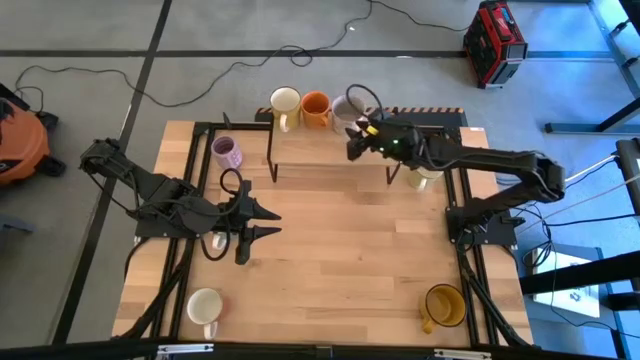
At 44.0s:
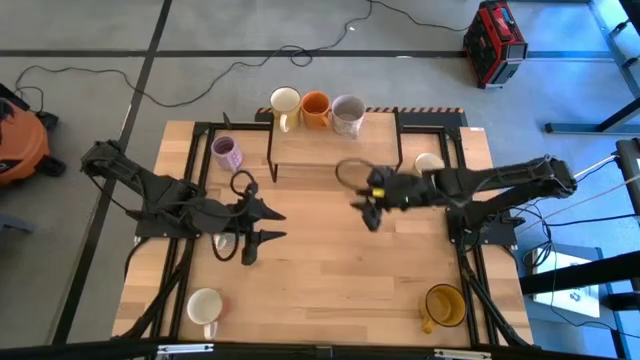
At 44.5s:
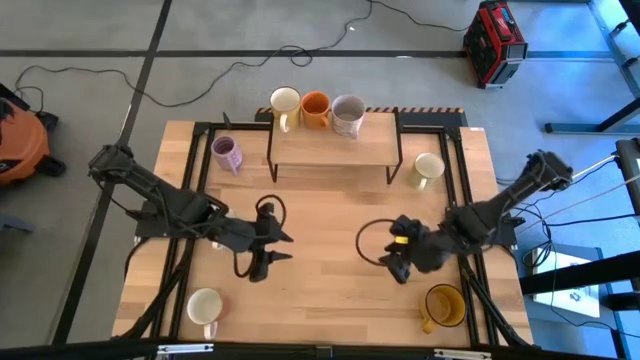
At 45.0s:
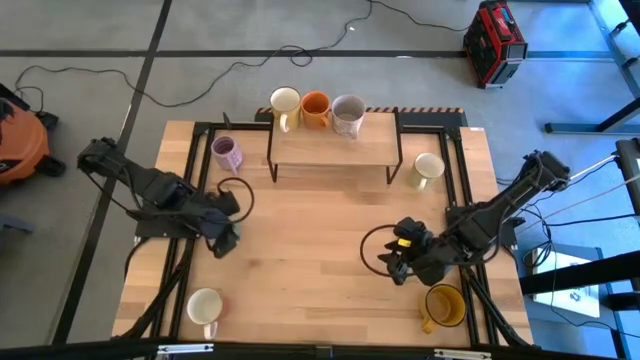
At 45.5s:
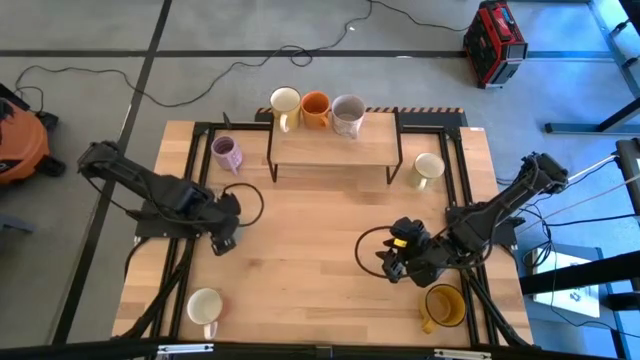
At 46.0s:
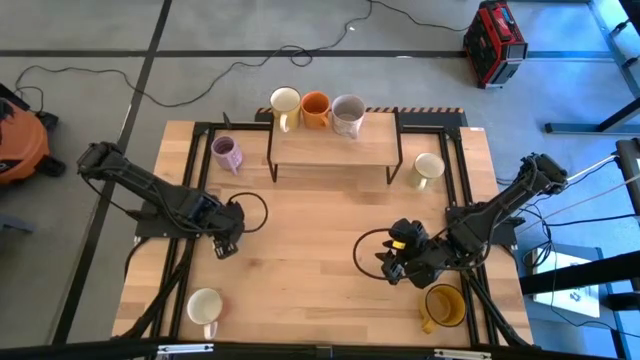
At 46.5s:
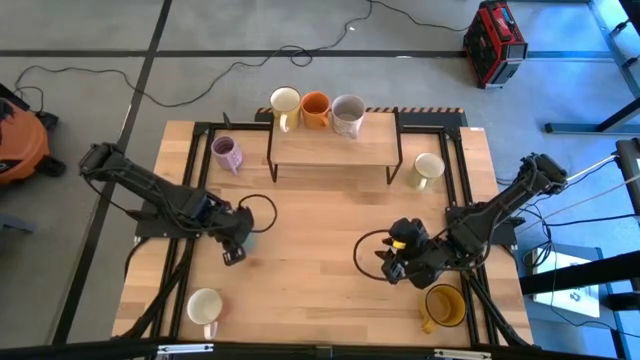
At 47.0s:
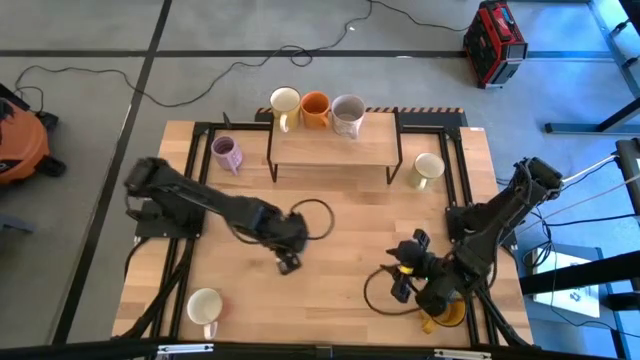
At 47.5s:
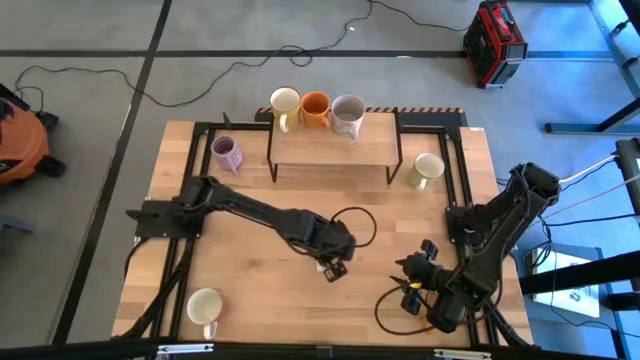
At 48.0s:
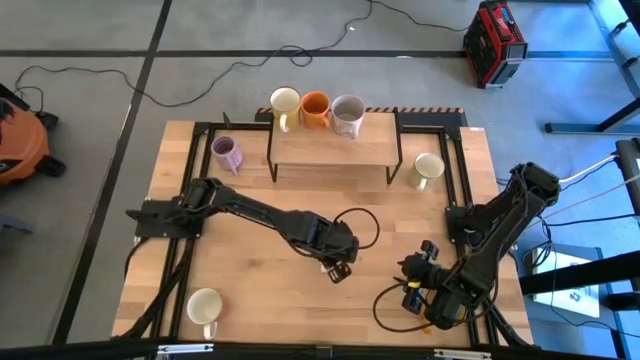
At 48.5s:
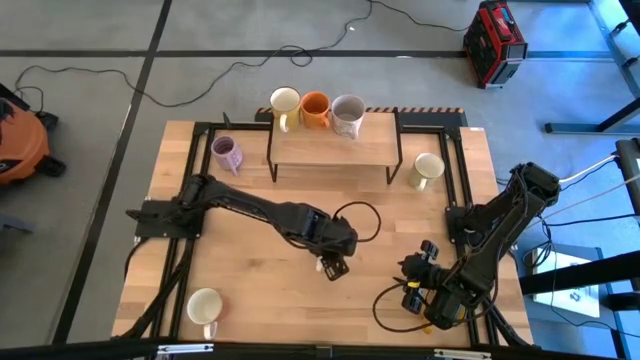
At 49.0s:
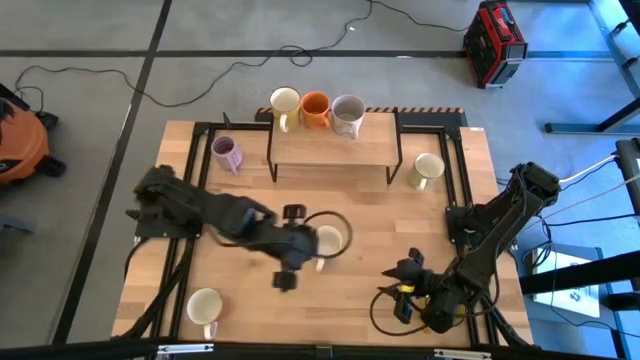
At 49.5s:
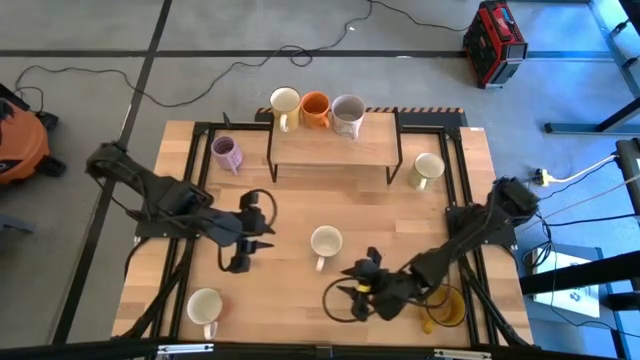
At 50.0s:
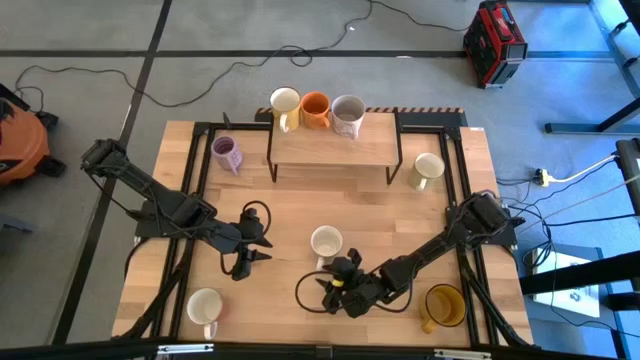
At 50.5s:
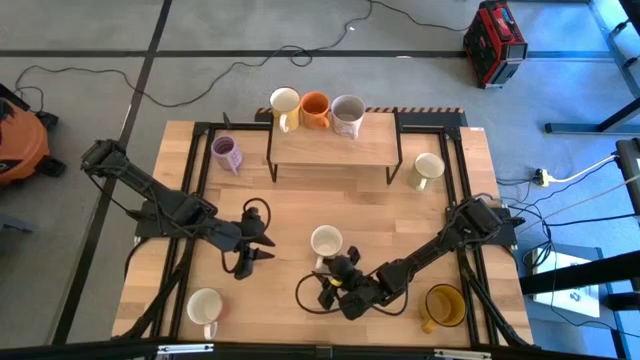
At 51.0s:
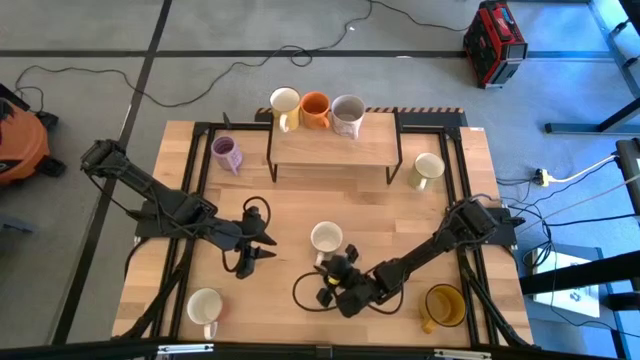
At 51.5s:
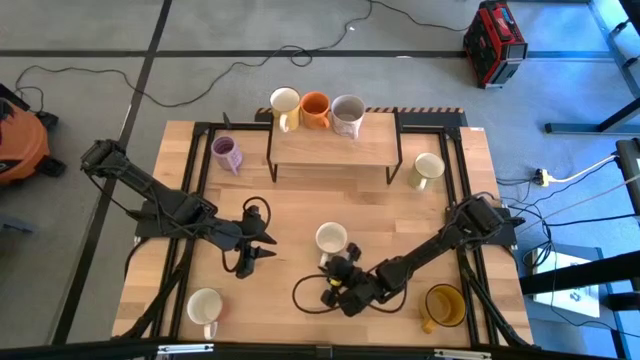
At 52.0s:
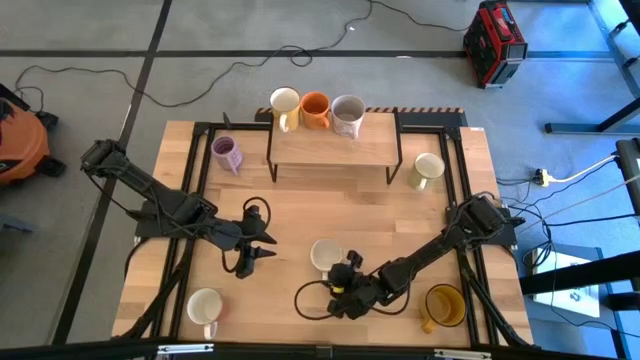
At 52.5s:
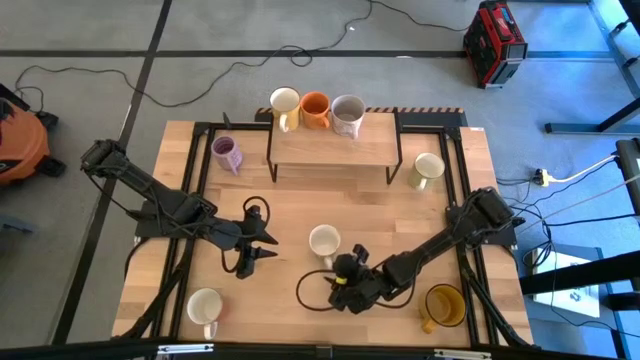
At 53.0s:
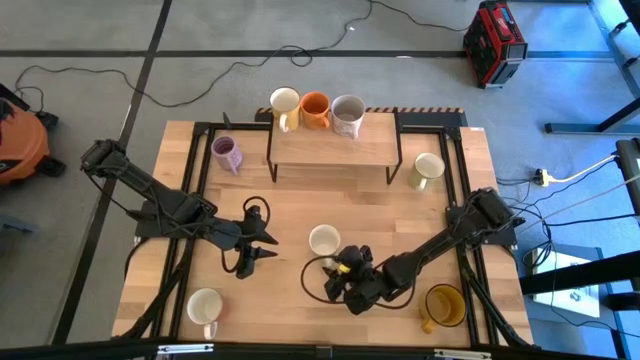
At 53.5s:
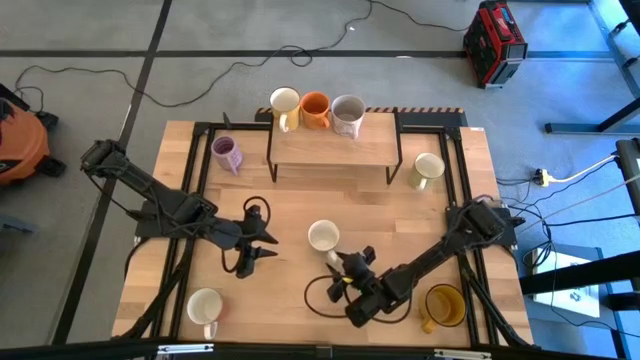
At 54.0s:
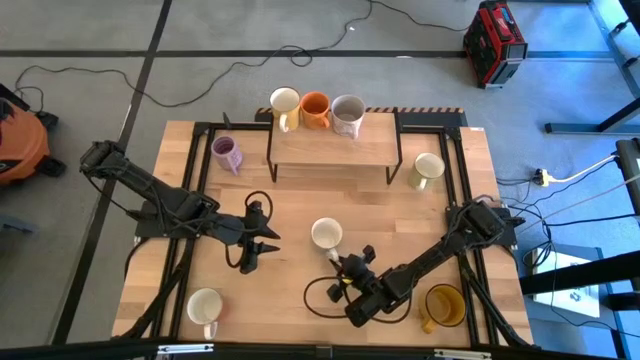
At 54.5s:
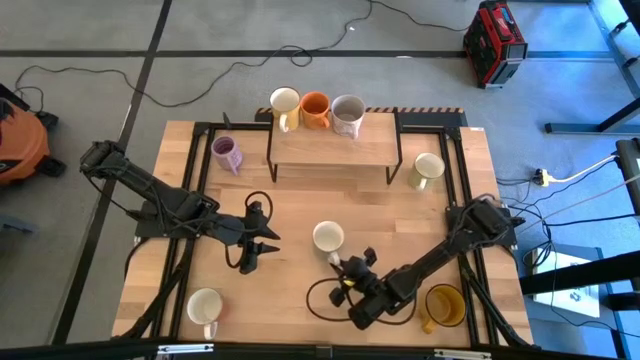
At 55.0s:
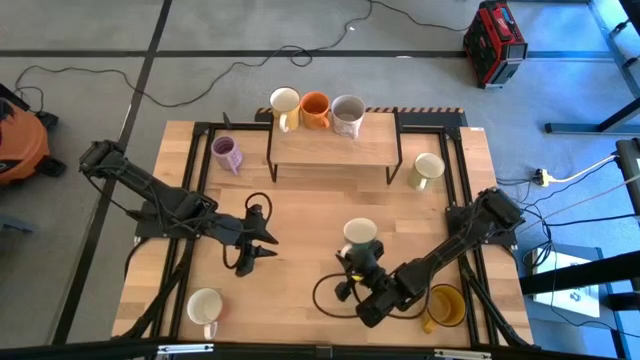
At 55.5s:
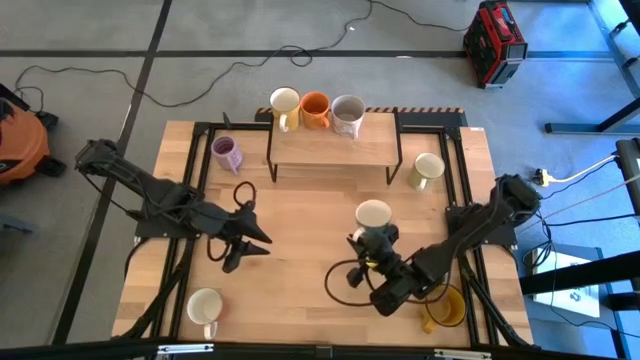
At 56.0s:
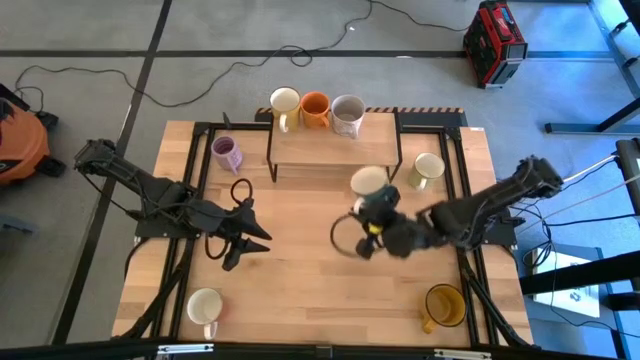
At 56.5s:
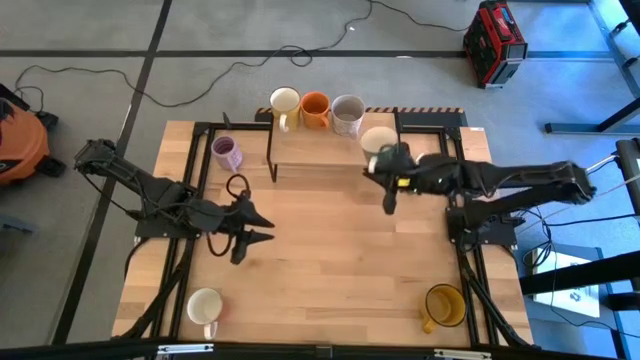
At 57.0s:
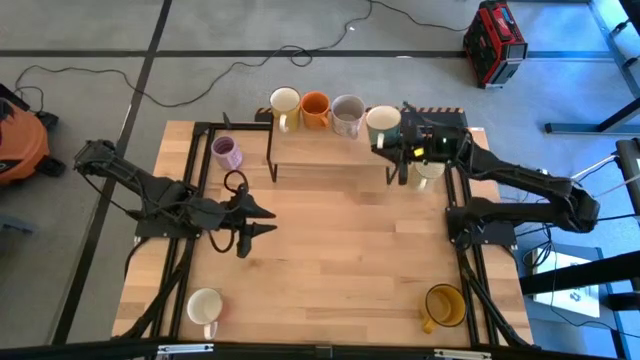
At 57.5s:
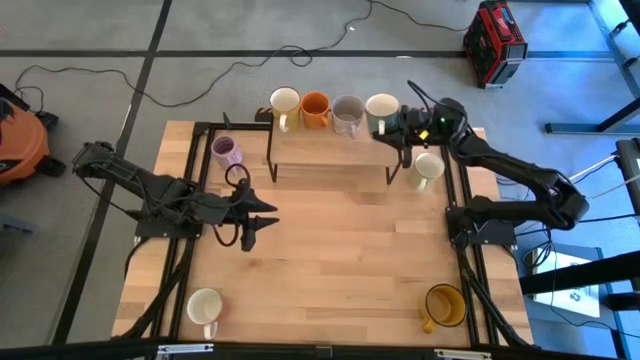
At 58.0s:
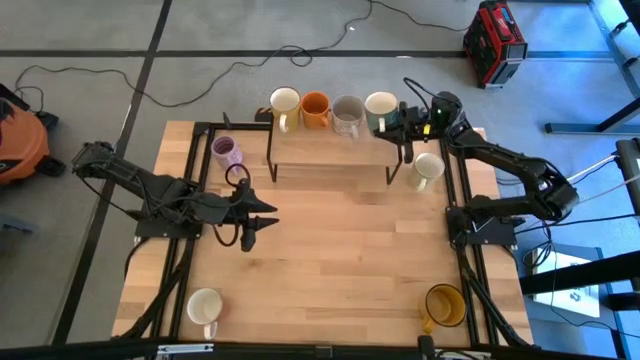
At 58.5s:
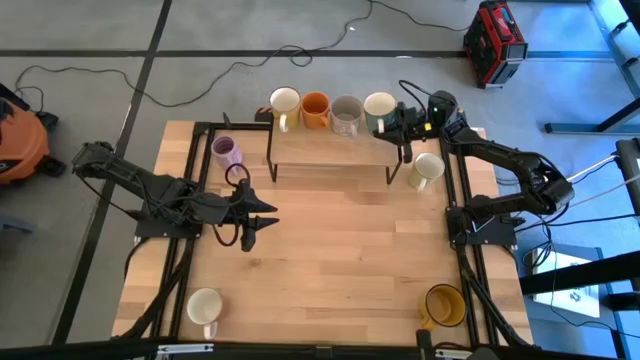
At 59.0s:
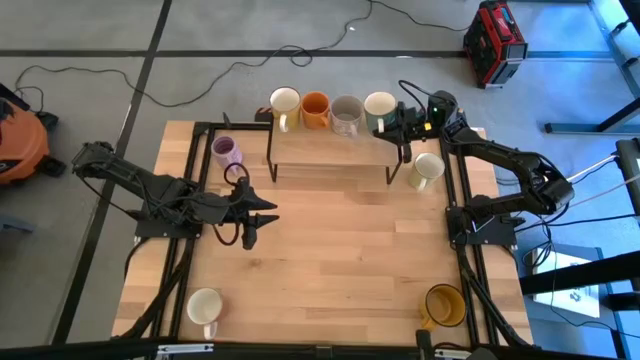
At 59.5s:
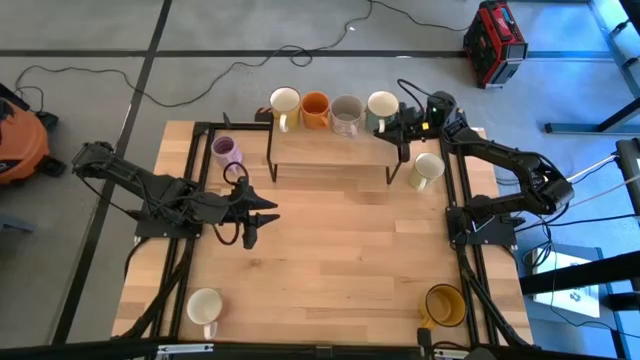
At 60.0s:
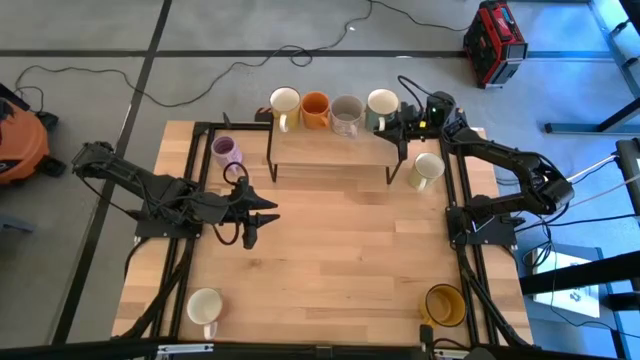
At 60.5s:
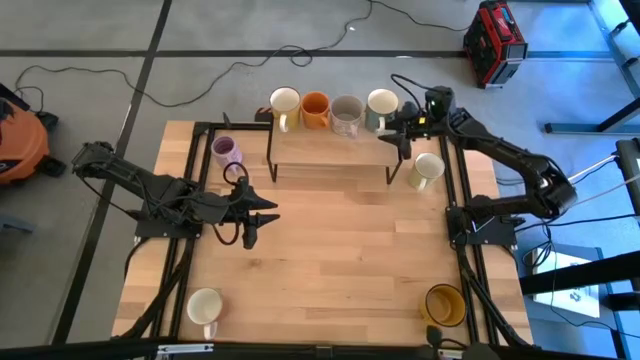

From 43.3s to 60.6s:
Task: Place coffee mugs
Put the blue mug on the shelf

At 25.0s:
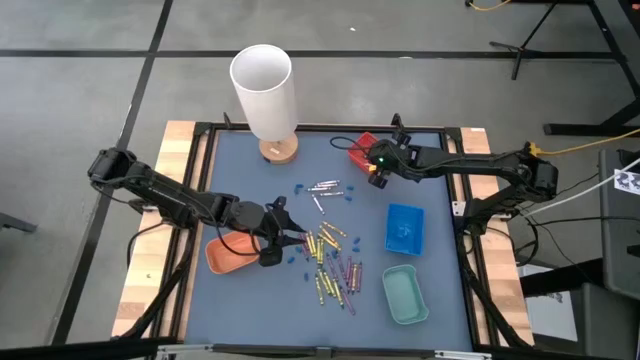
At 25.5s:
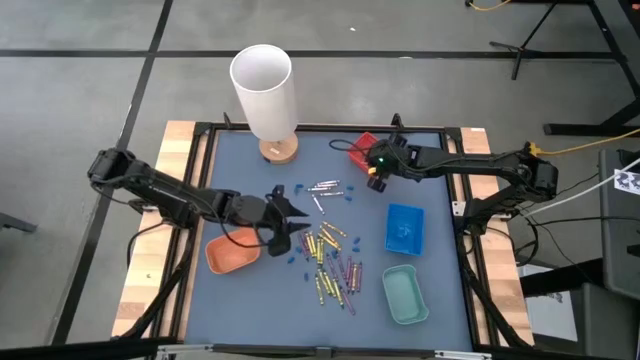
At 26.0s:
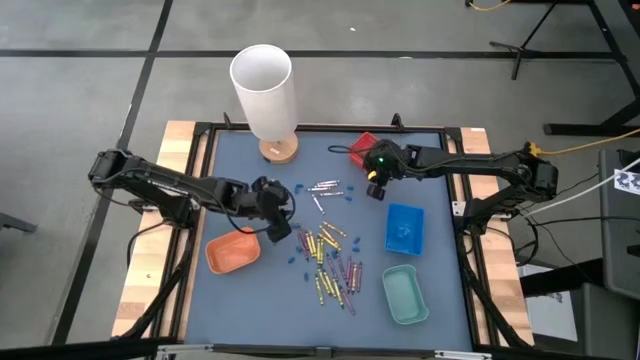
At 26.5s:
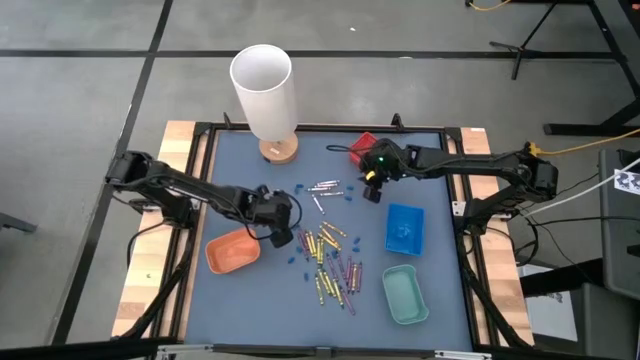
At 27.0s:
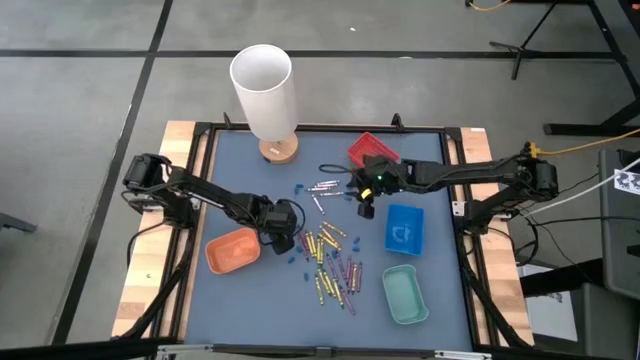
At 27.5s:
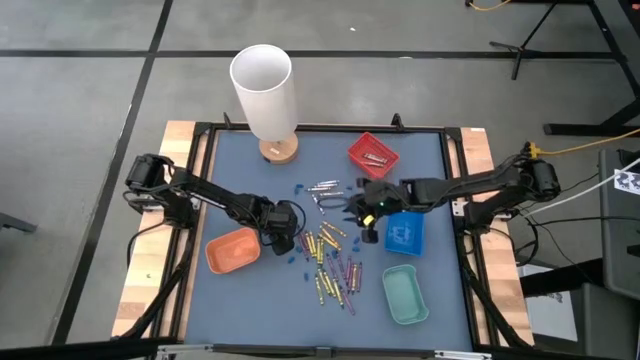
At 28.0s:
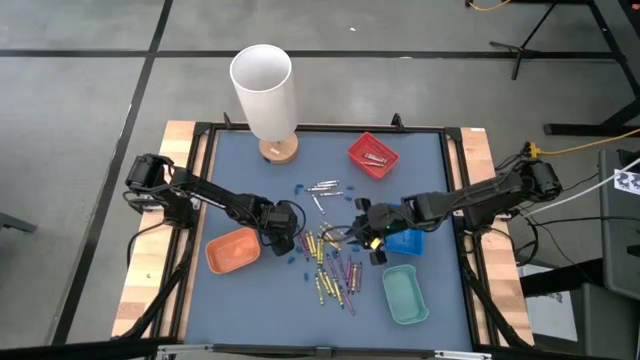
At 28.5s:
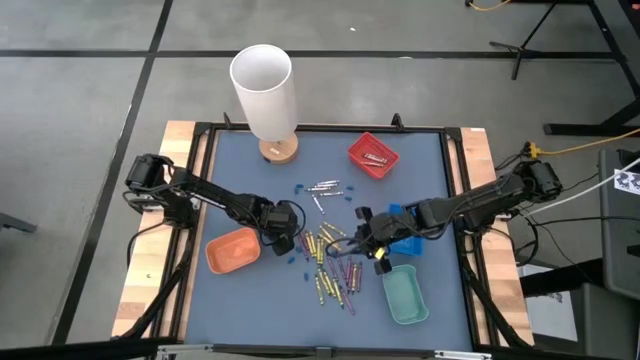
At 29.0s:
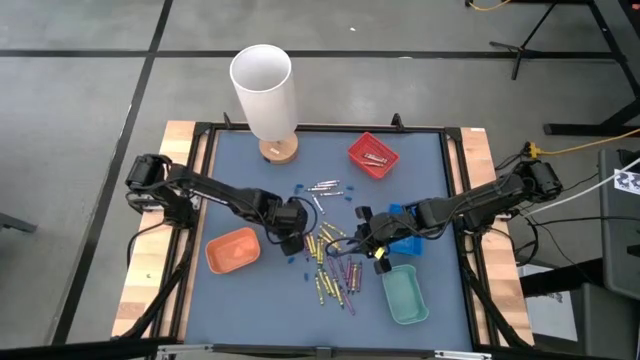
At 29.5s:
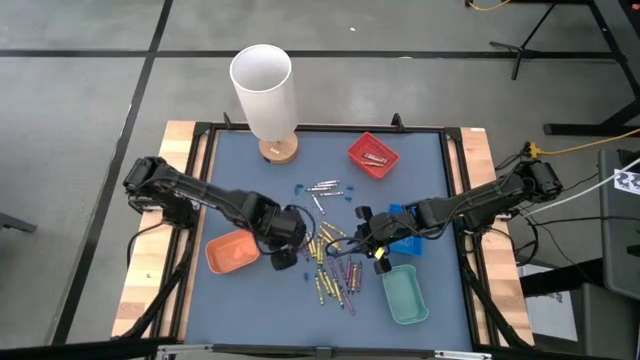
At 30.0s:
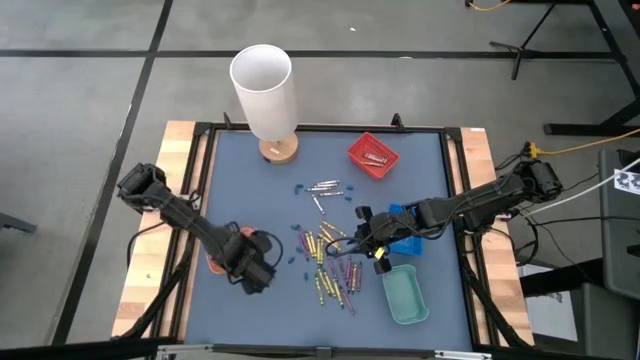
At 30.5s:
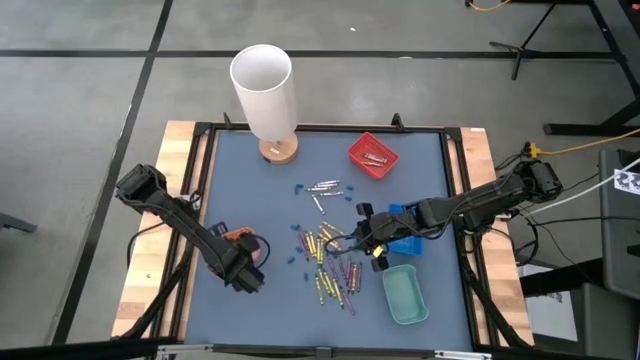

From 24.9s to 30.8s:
Task: Sort crayons
Put the violet crayon into the orange bin
